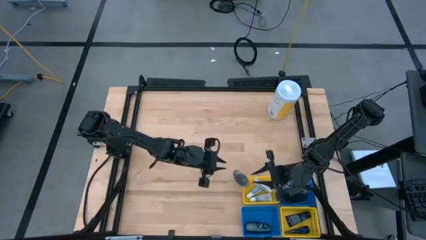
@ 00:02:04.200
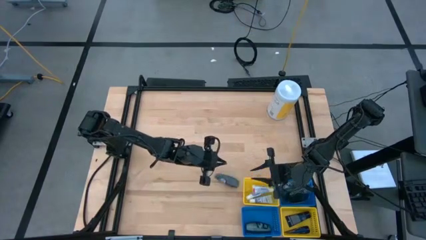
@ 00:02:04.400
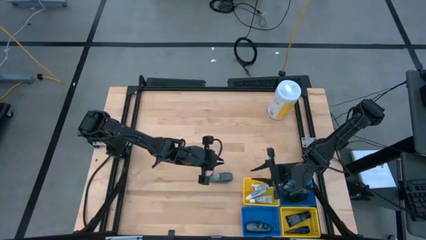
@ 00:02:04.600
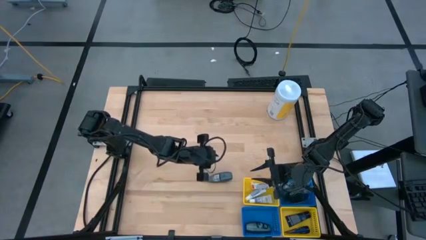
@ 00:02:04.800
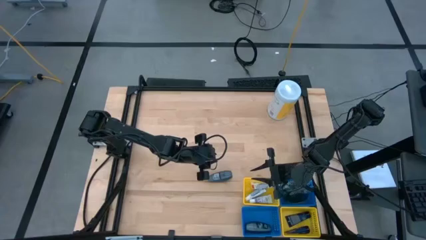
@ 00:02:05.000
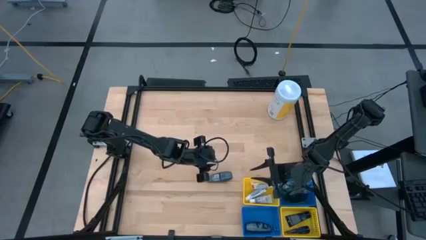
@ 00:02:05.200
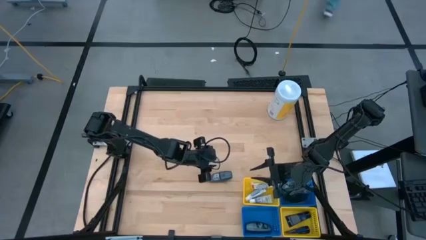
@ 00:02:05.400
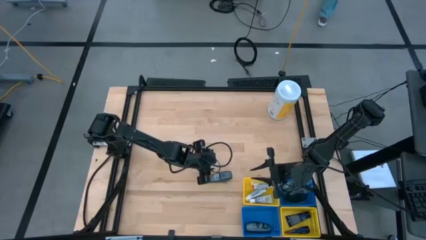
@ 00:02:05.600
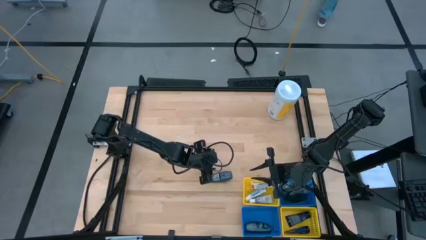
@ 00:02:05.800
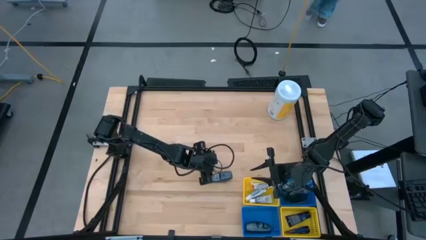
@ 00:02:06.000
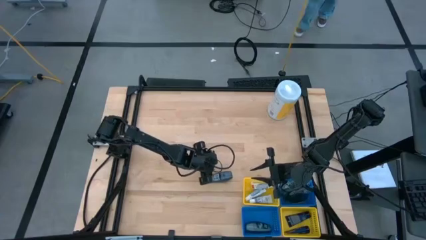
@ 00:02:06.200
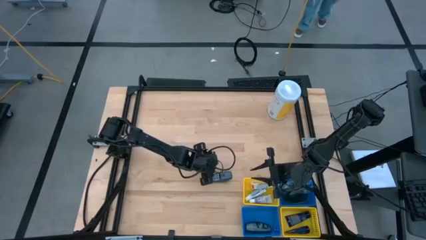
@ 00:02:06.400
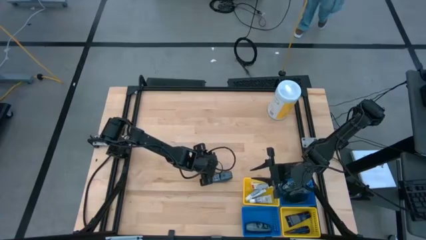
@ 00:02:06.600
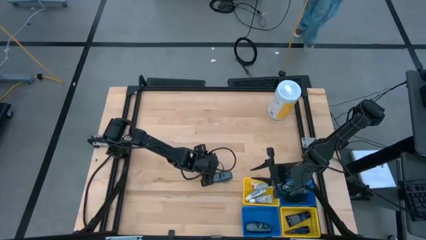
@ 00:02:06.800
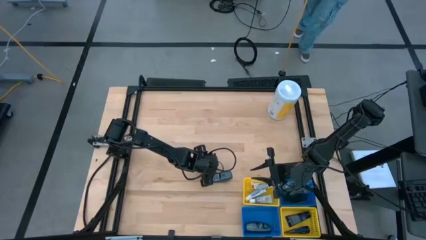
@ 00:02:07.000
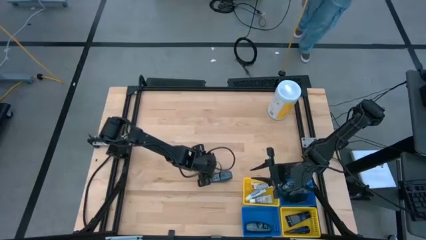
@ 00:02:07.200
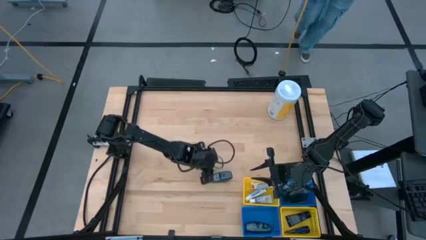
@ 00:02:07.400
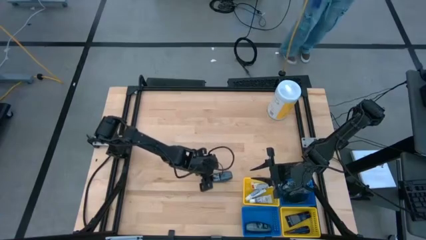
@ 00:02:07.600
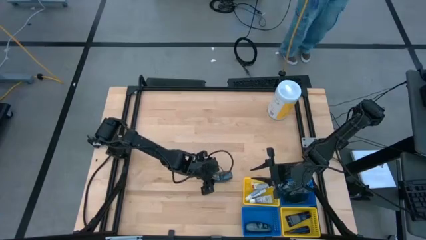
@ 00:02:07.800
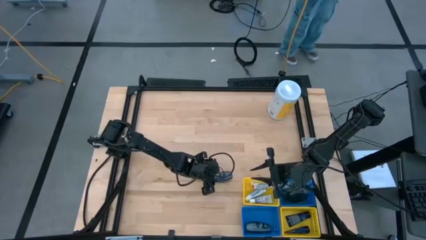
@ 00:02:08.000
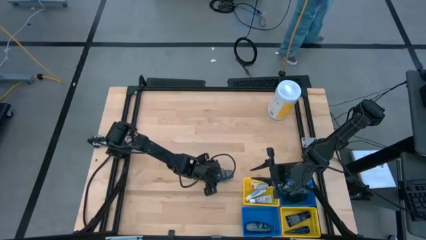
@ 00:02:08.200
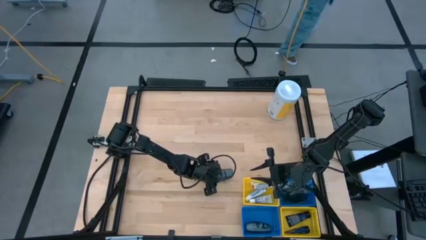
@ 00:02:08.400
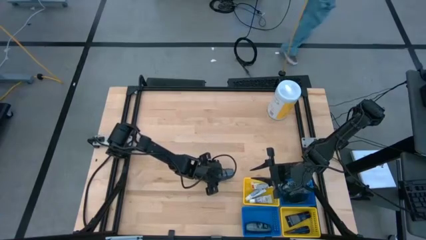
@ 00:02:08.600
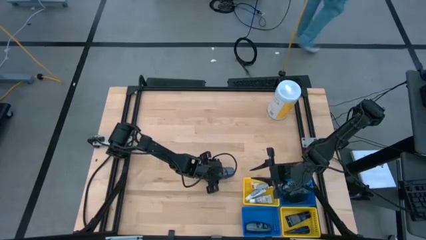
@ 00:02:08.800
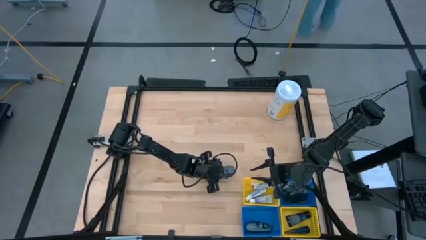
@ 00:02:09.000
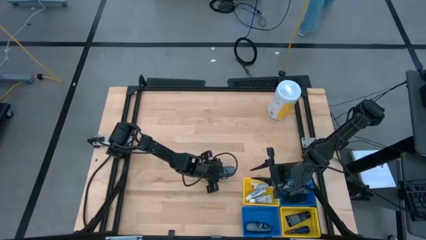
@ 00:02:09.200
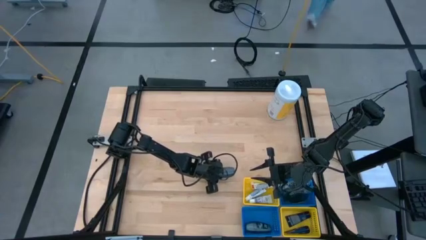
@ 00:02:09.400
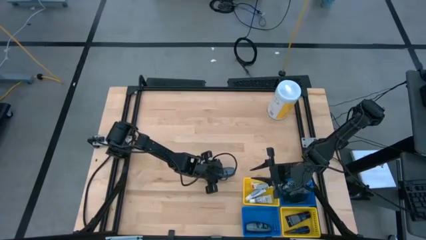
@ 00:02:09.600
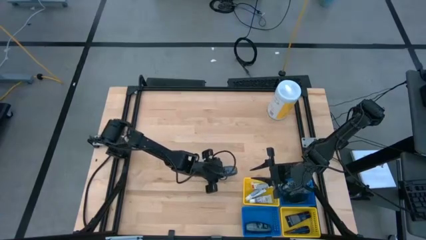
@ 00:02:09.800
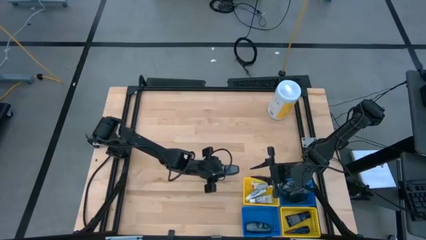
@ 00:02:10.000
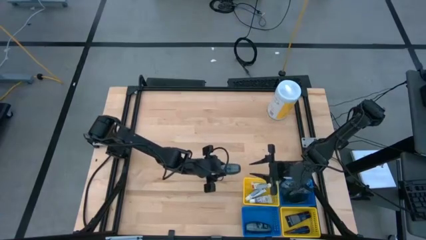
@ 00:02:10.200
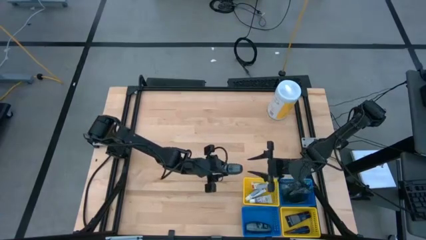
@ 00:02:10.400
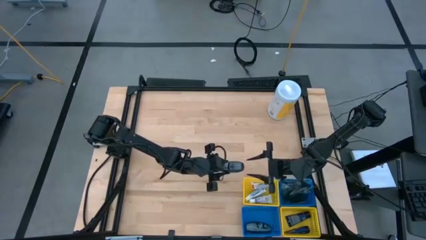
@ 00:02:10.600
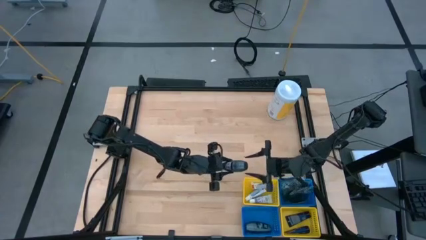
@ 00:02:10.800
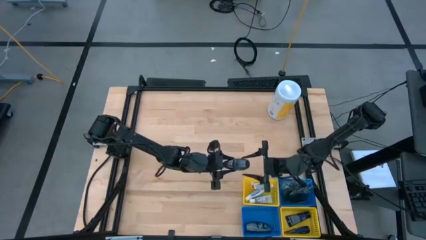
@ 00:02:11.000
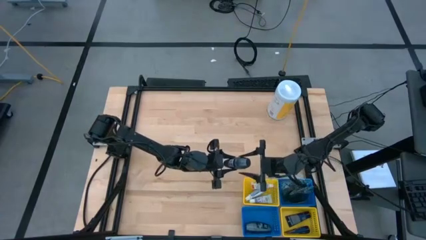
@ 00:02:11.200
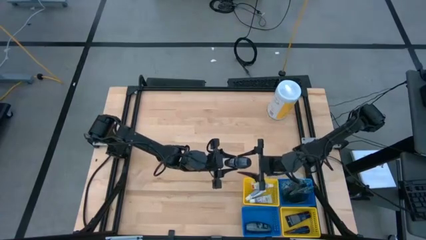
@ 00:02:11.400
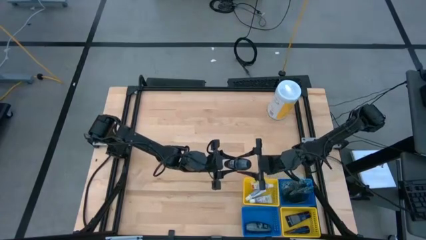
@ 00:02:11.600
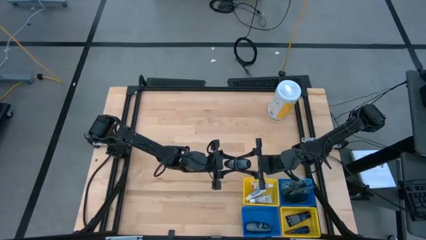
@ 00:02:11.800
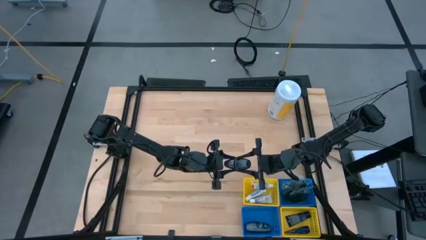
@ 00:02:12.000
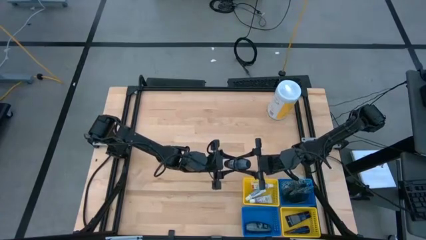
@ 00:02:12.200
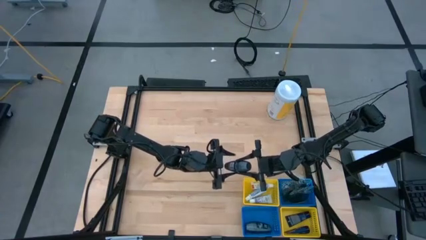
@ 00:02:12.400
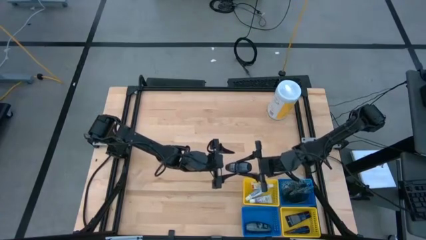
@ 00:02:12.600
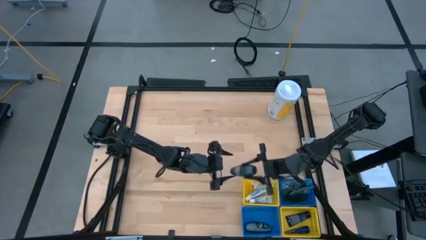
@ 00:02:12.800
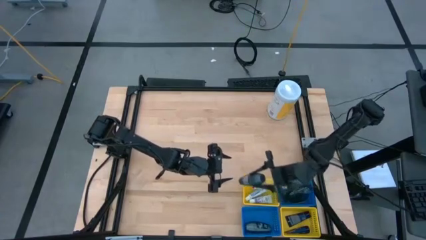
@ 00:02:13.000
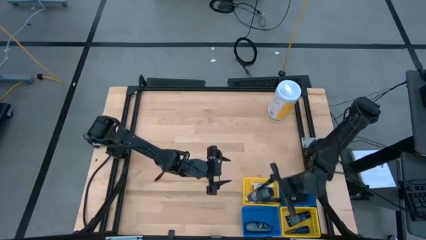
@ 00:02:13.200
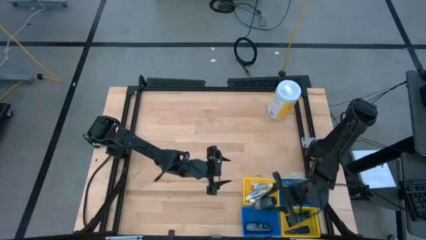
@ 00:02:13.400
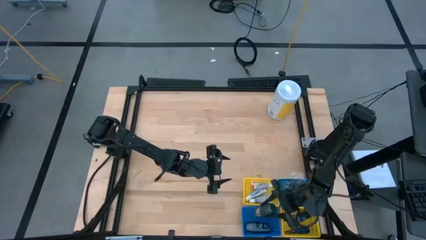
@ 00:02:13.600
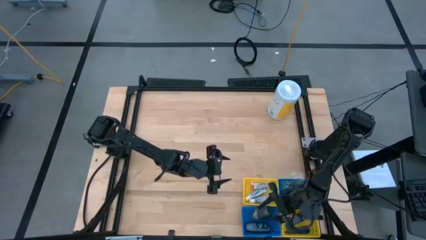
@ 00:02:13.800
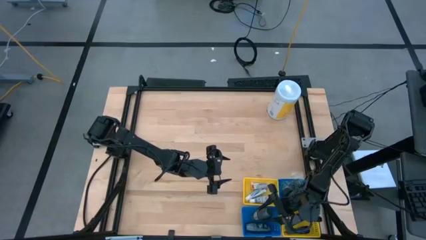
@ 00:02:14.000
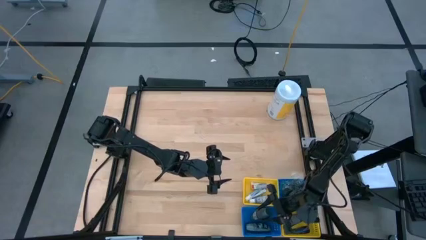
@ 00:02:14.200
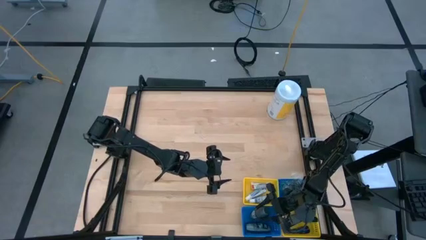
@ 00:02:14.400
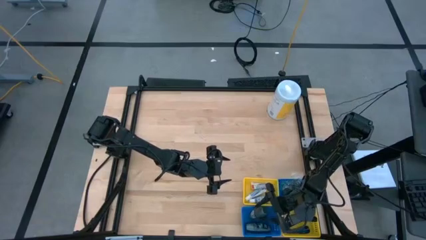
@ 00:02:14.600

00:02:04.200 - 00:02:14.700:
Task: Pick & Place Travel size toiletries
Put the black deodorant into the bottom blue bin

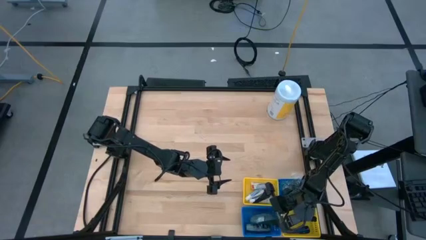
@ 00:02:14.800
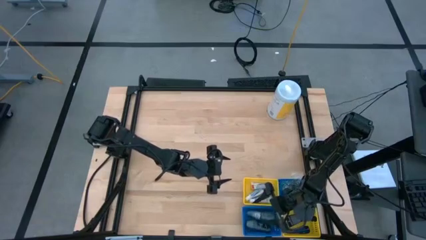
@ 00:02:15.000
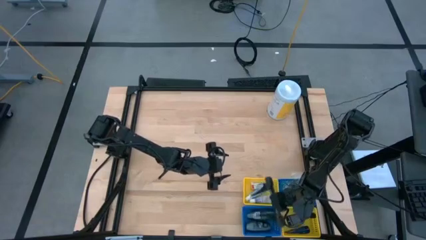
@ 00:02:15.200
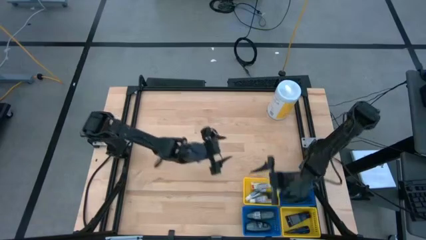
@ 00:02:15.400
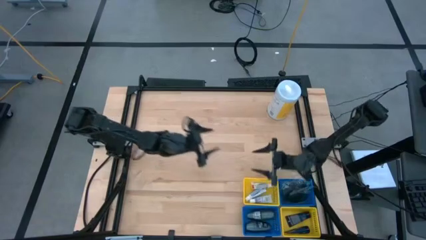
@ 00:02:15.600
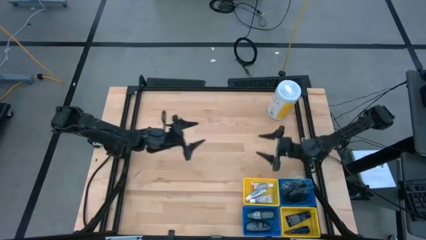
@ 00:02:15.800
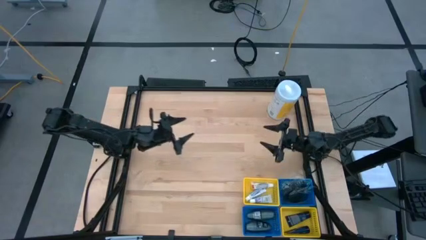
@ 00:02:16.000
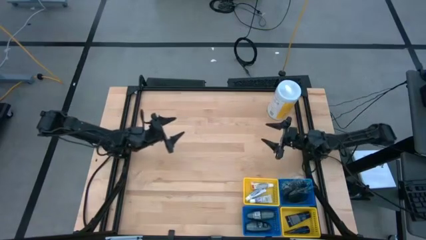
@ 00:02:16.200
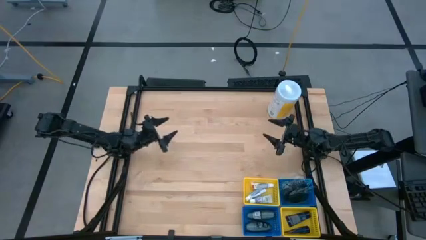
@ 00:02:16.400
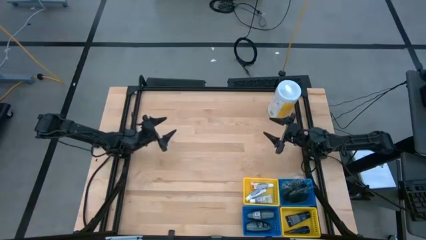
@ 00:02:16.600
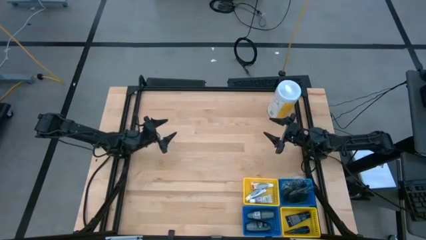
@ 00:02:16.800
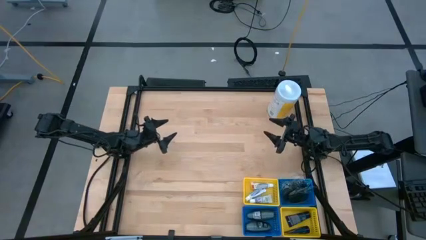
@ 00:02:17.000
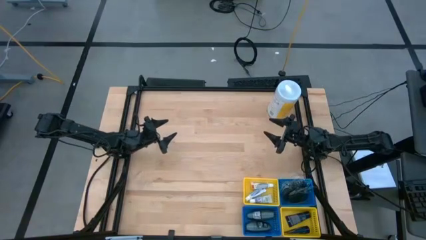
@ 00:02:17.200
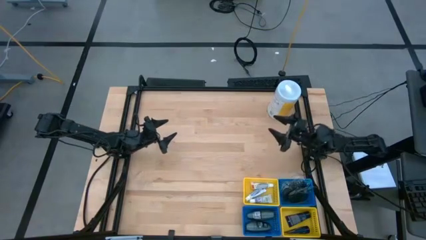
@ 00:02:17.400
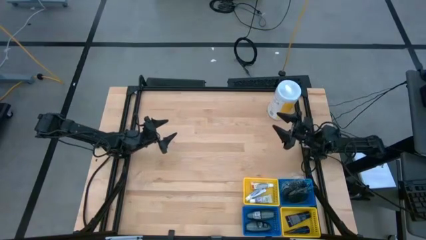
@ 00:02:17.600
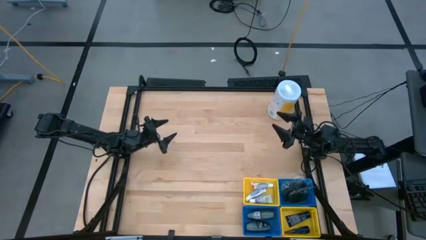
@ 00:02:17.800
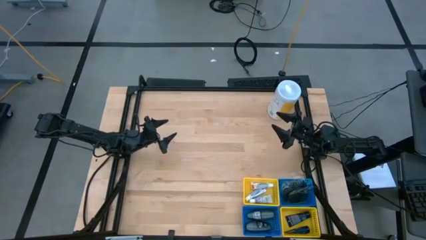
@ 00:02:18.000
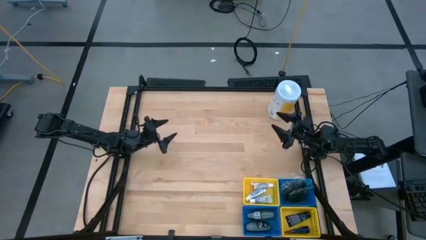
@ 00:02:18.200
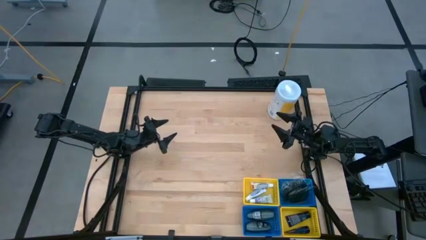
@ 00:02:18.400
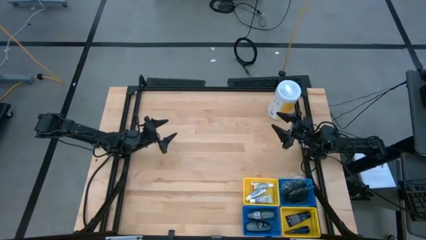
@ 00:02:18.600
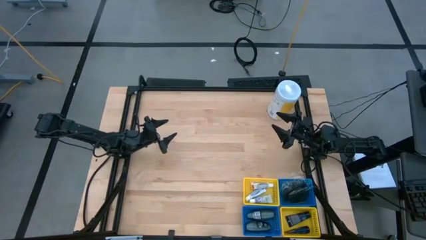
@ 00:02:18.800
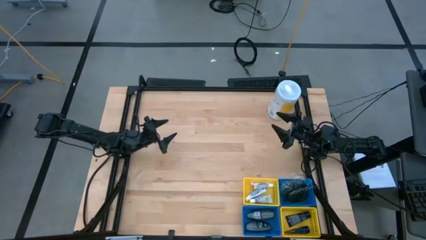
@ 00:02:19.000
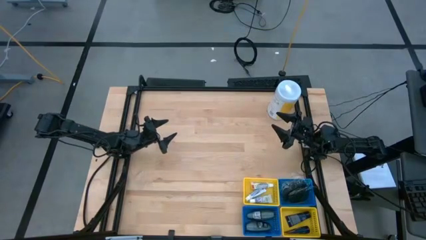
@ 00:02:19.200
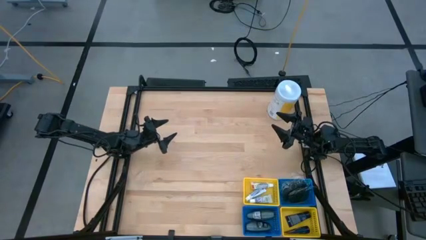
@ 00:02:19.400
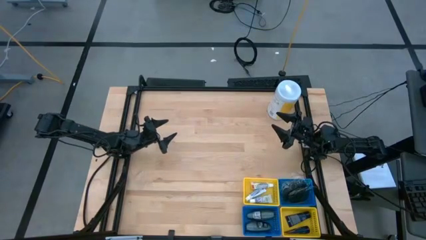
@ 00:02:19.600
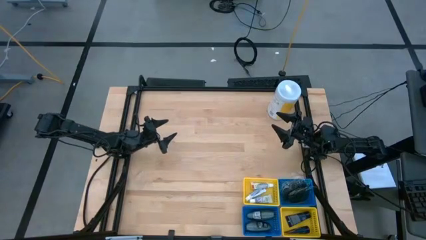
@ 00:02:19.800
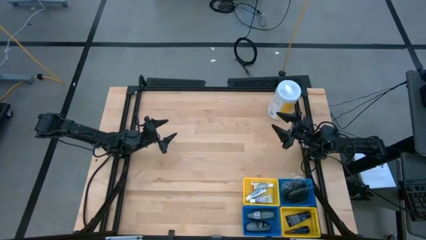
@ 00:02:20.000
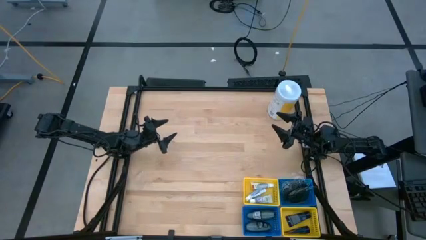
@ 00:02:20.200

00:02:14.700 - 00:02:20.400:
Return to Home Position

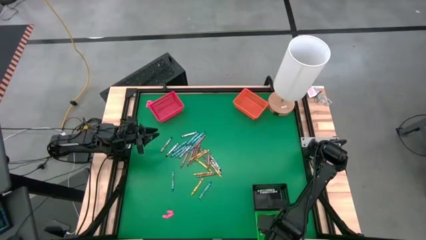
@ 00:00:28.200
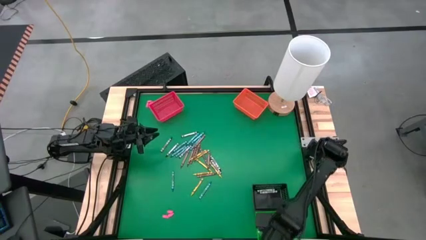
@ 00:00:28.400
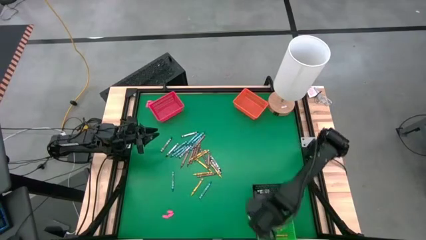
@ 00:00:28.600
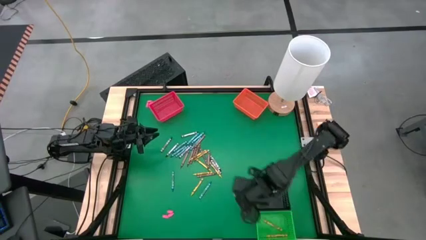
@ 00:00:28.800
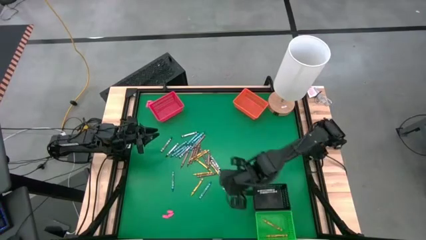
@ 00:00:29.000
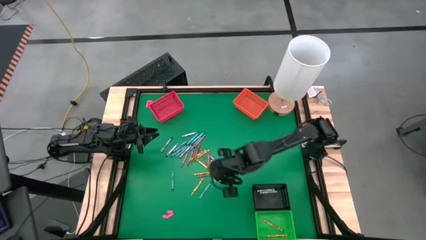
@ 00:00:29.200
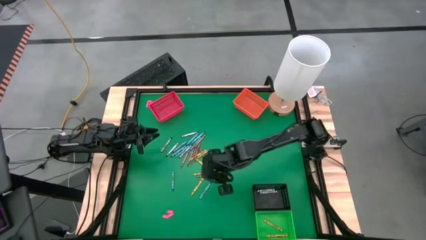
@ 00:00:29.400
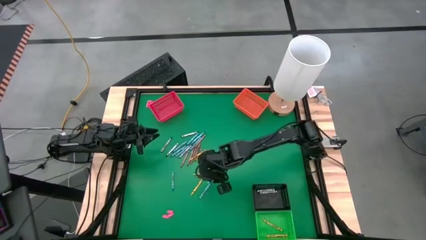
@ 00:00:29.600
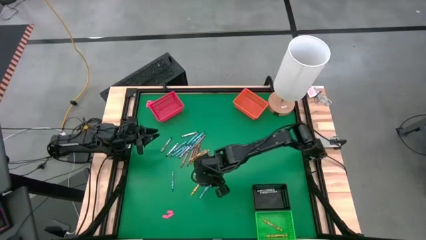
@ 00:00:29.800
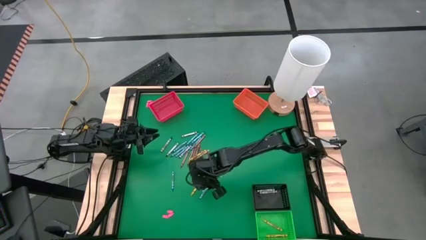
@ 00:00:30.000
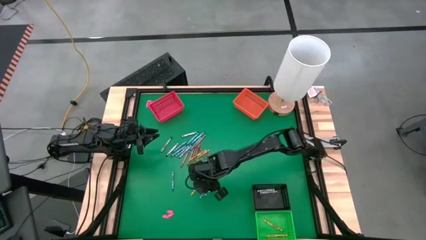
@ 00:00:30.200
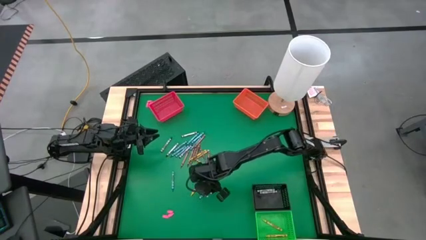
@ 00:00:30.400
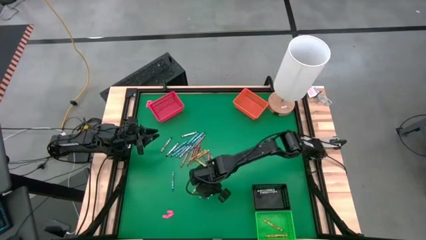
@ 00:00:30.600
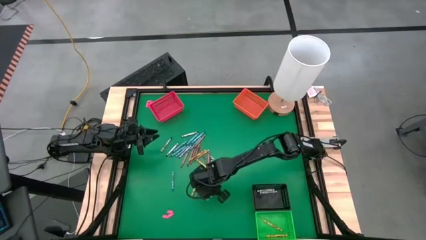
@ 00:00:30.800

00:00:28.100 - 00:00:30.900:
Task: Sort crayons
Put the blue crayon into the orange bin
